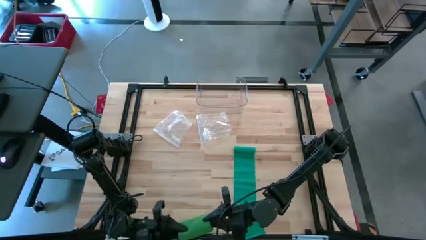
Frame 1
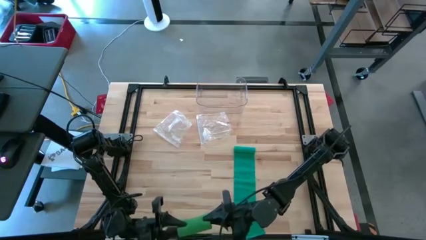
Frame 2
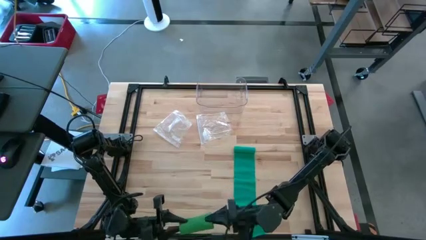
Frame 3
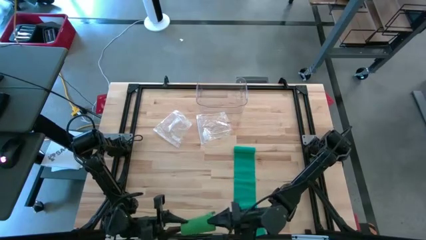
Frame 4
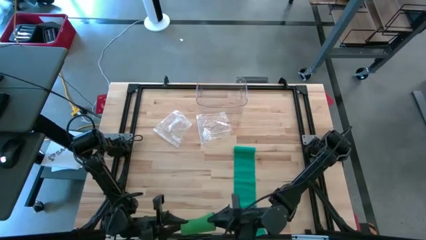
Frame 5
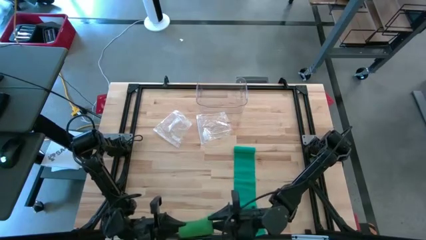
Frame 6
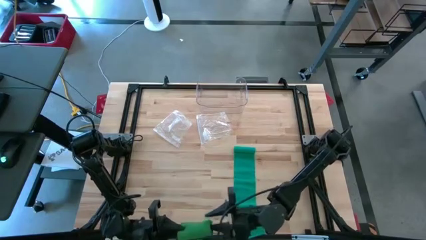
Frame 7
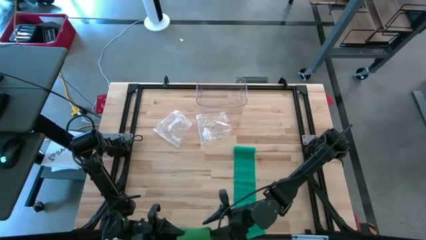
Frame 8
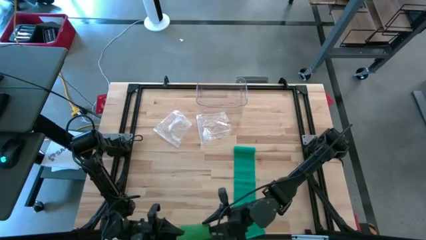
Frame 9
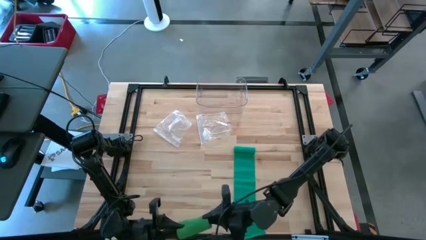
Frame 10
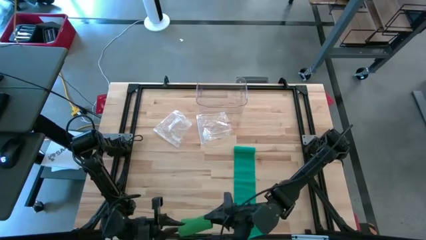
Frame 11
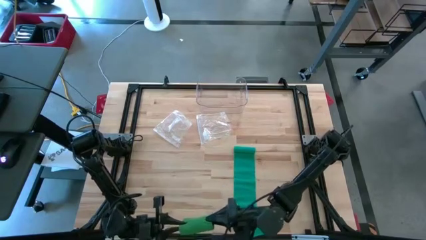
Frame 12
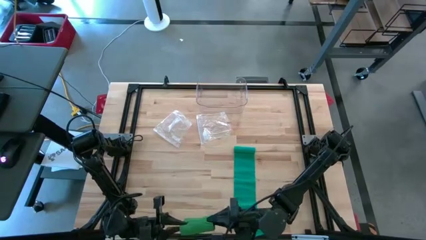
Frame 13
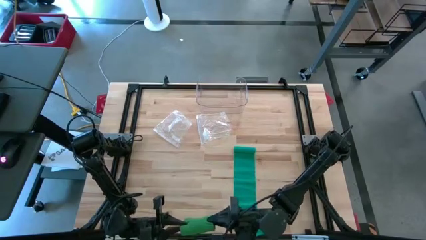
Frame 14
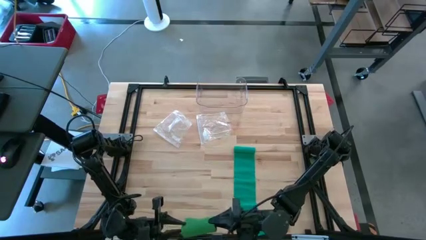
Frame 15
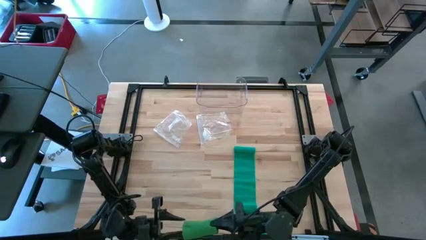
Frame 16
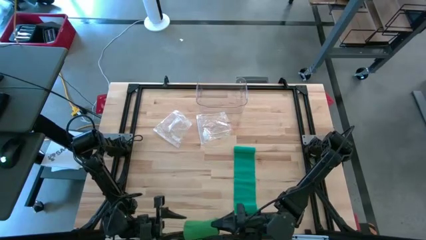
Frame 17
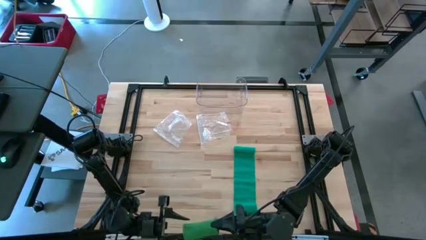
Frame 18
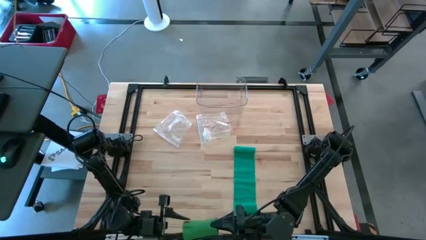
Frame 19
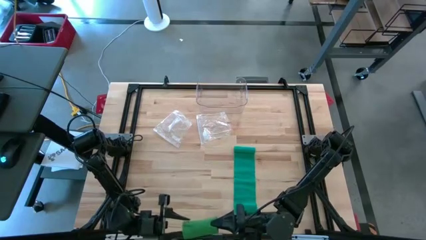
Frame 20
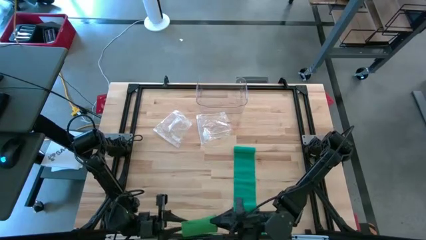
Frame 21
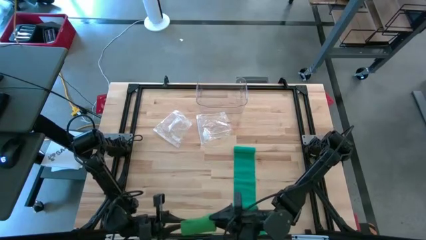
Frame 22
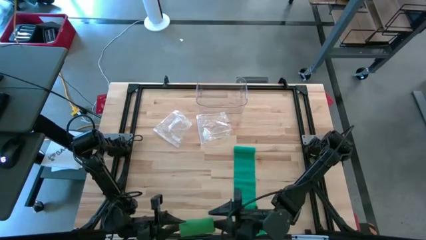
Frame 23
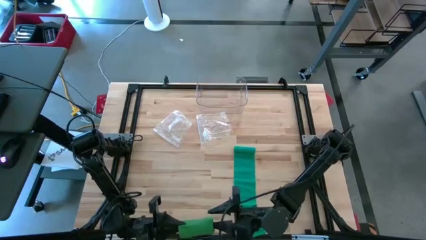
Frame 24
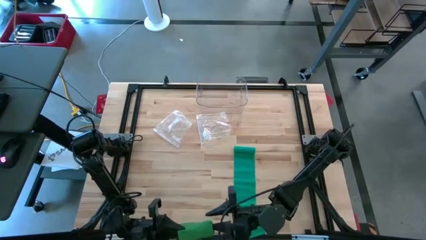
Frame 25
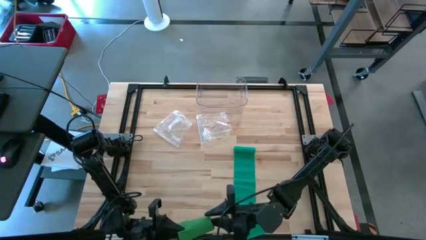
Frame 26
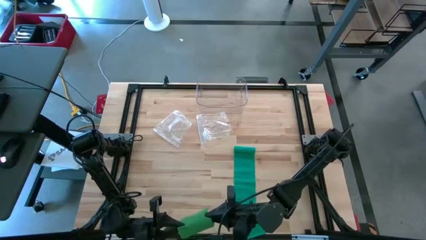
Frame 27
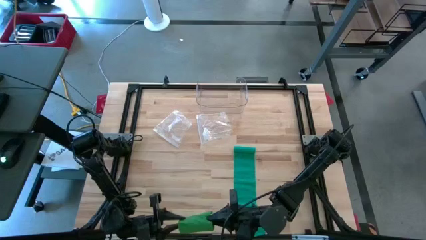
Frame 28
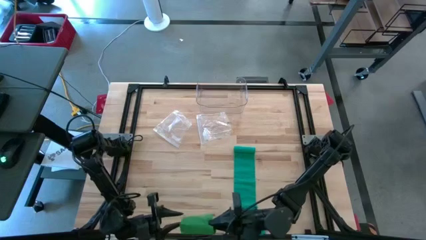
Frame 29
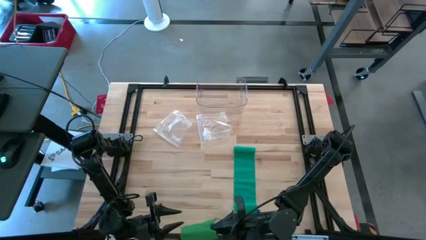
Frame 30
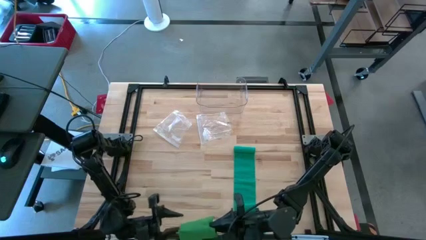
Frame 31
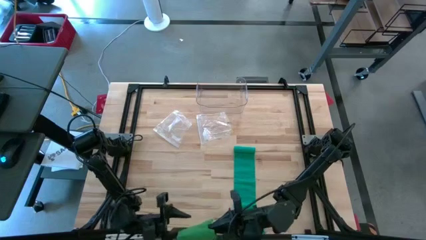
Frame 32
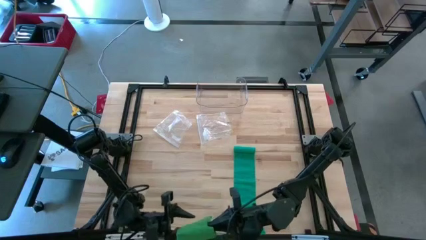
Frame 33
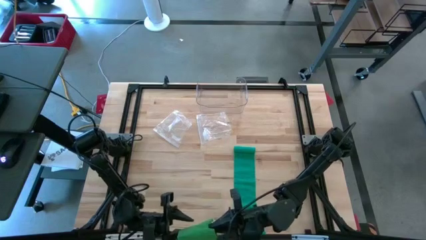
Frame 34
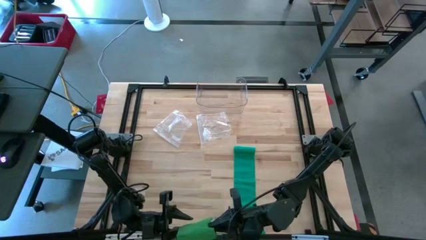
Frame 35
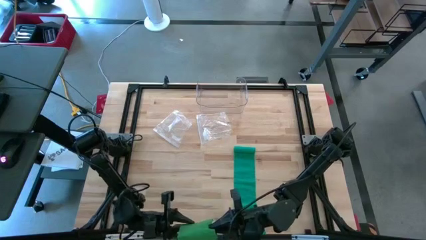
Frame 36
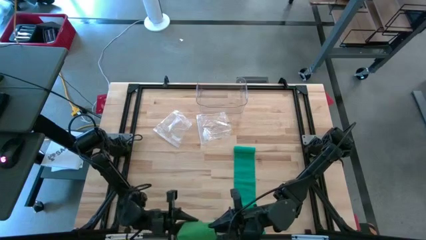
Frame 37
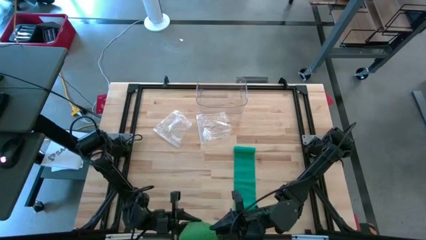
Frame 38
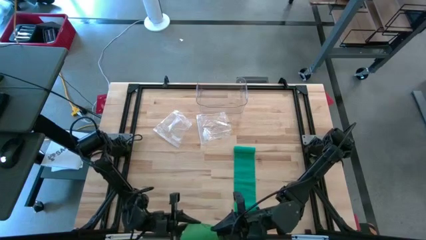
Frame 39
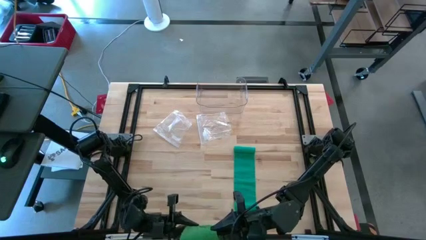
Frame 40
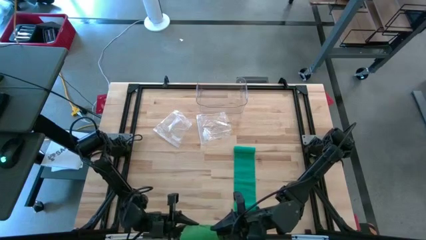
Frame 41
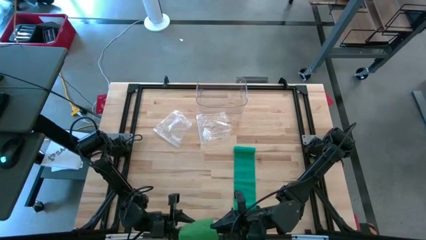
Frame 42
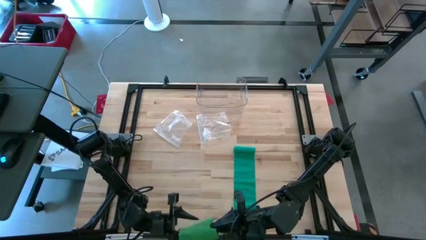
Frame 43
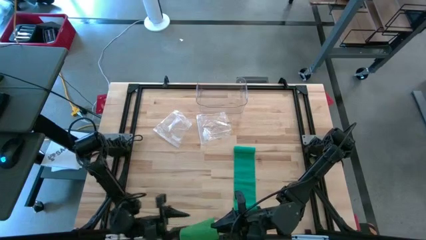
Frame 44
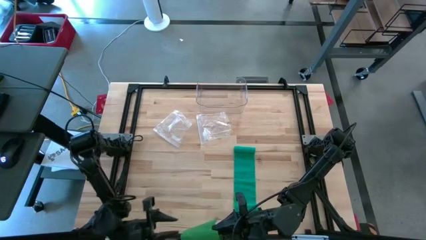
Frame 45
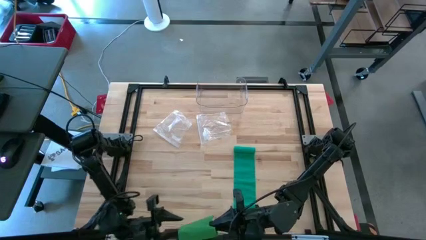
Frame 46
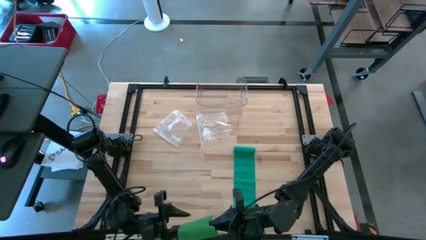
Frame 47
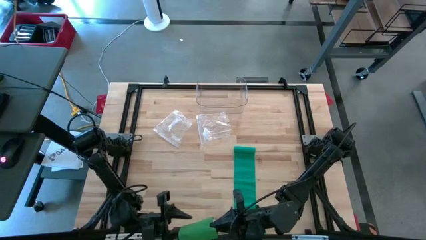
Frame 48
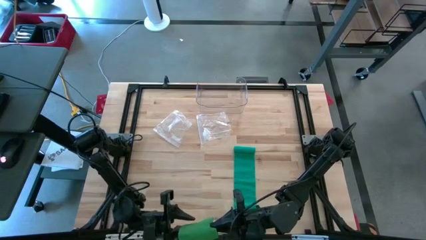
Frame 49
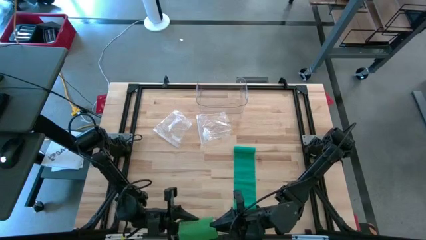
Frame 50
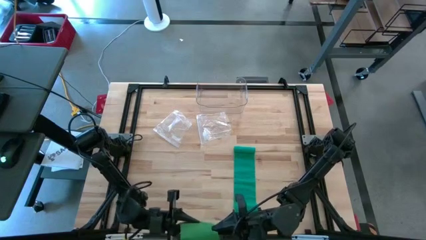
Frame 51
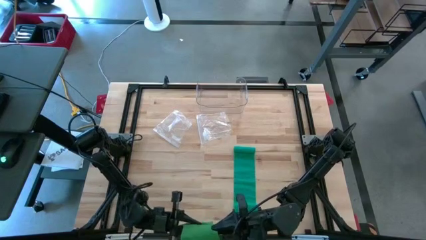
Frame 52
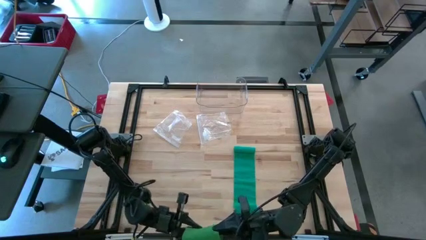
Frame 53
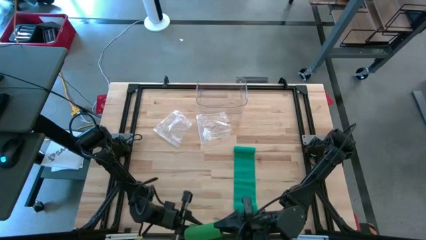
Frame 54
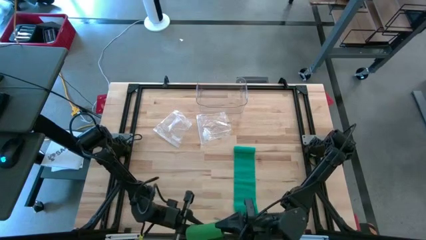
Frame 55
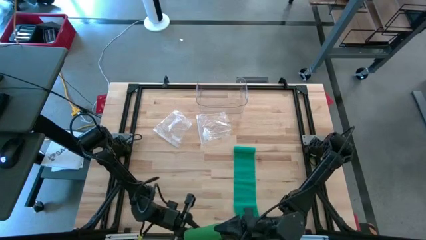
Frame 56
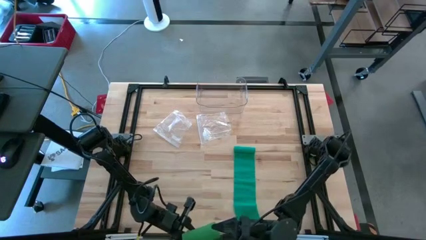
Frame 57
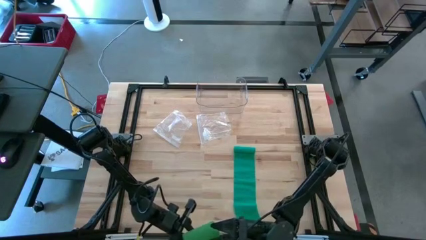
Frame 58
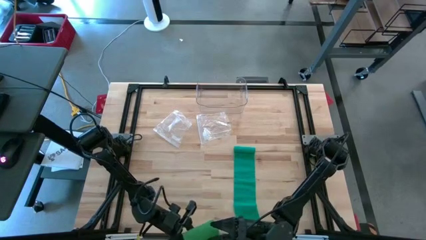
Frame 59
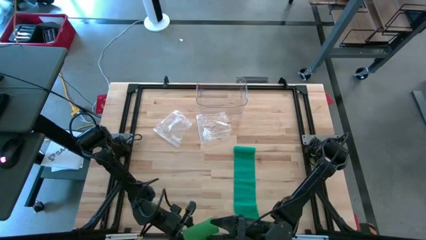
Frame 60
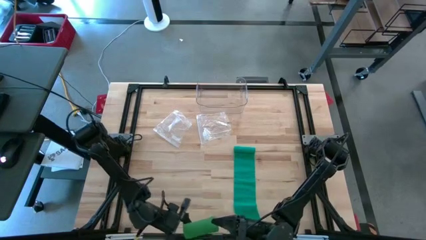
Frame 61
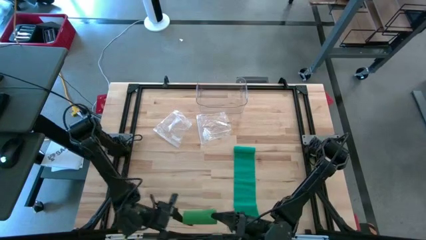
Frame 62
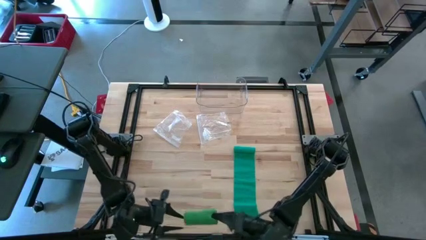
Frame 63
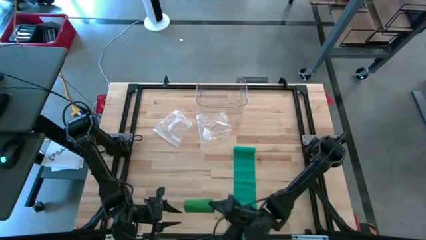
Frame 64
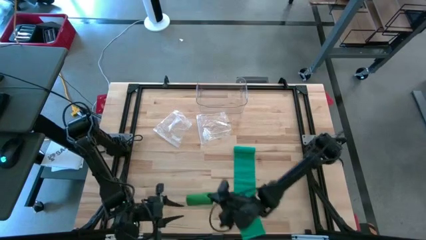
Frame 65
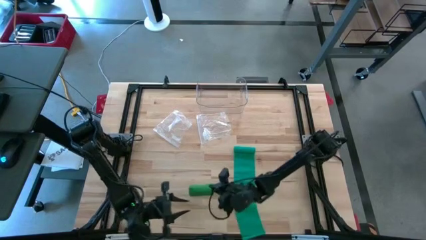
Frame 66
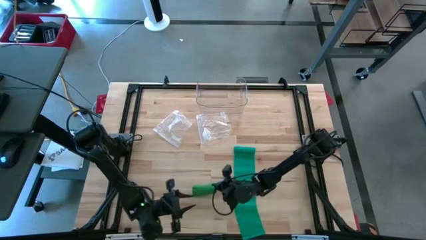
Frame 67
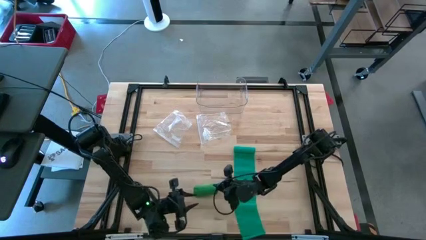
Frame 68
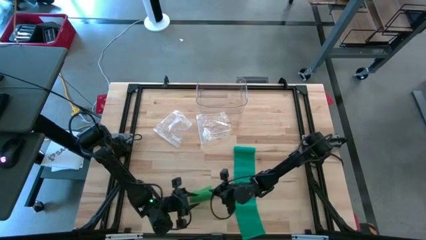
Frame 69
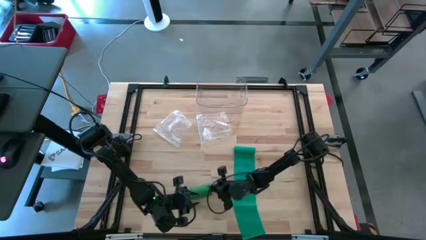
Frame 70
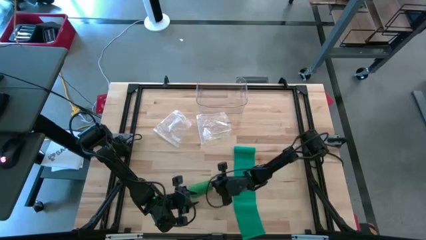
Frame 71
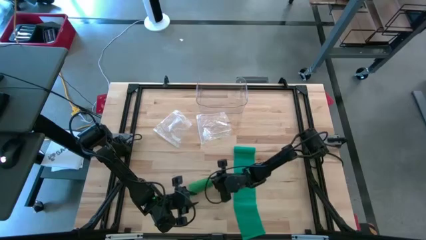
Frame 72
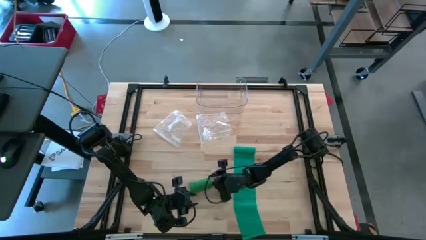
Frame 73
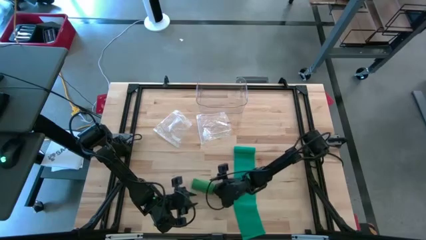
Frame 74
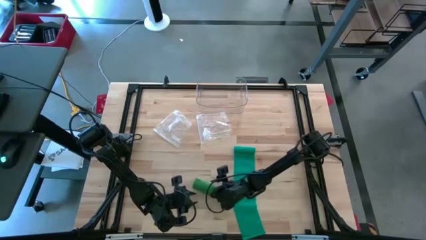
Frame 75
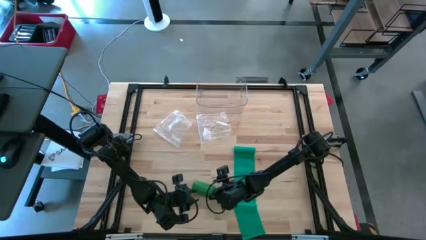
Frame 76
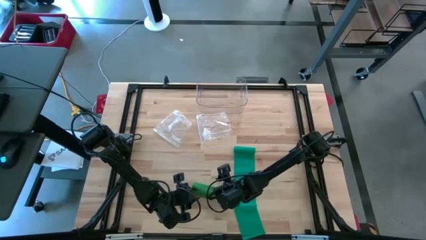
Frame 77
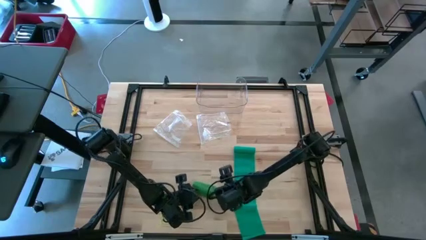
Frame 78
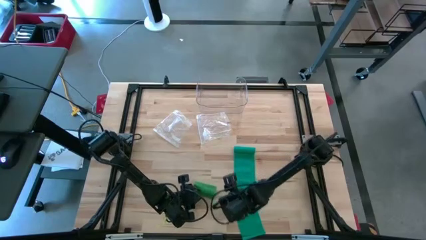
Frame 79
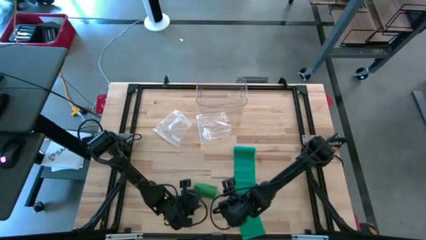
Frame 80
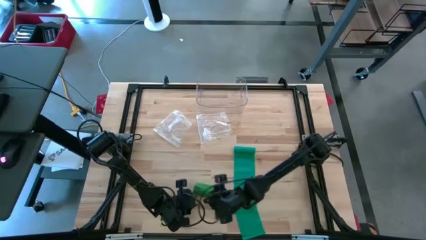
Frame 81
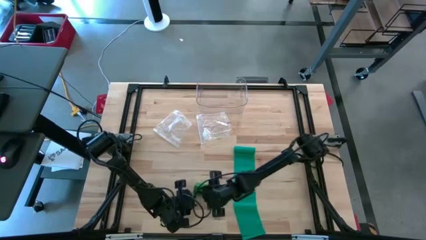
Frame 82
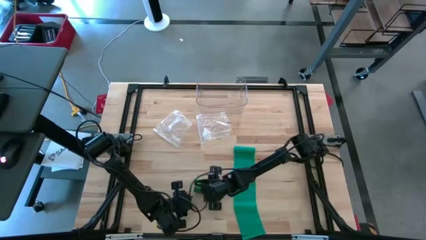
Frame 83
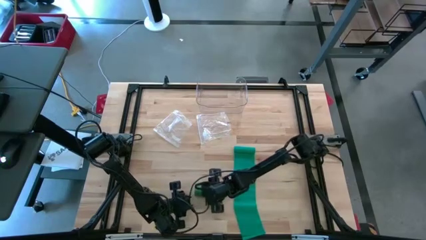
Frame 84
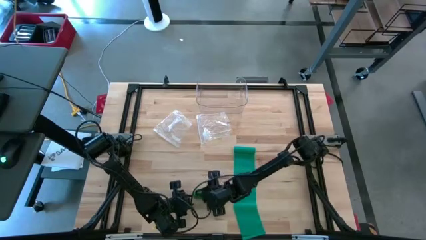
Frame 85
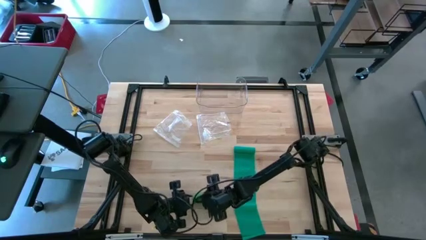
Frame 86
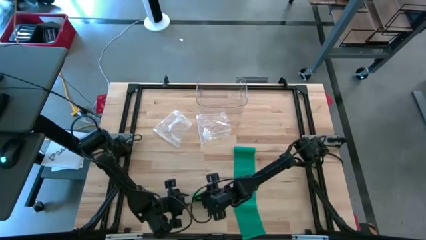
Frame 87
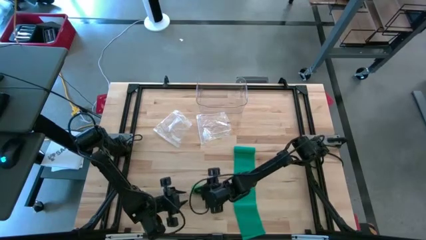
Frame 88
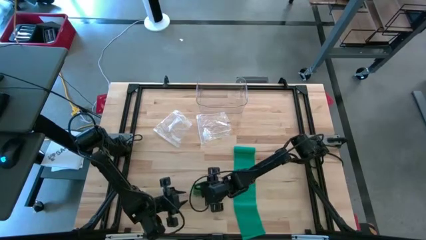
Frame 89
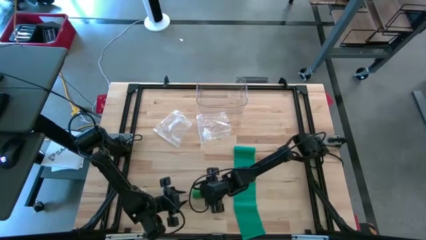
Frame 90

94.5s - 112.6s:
Task: Roll bandage
Roll the green bandage
